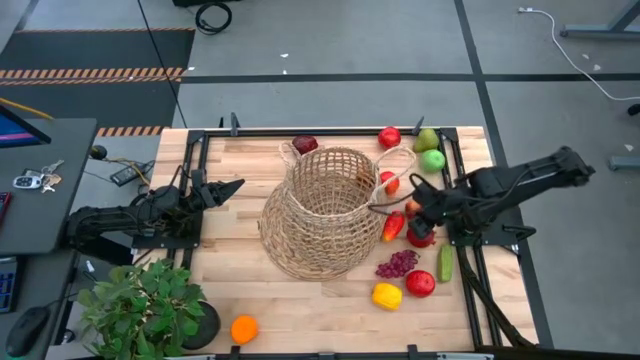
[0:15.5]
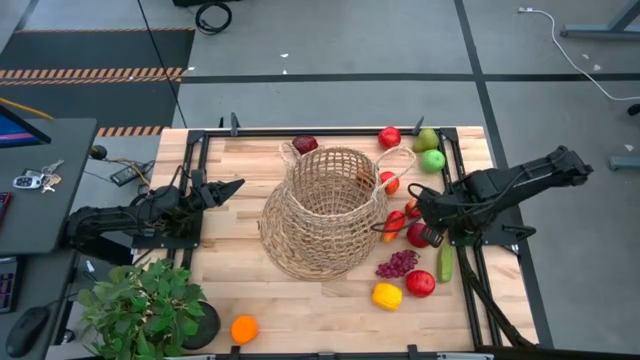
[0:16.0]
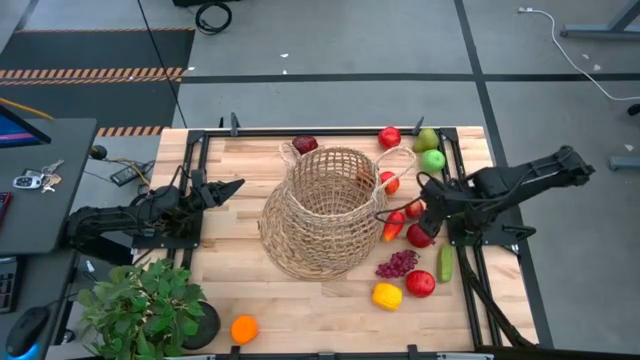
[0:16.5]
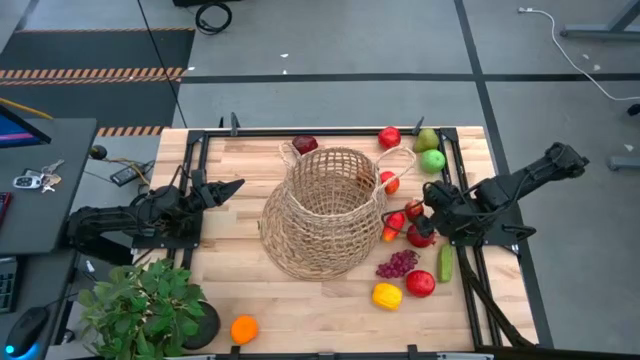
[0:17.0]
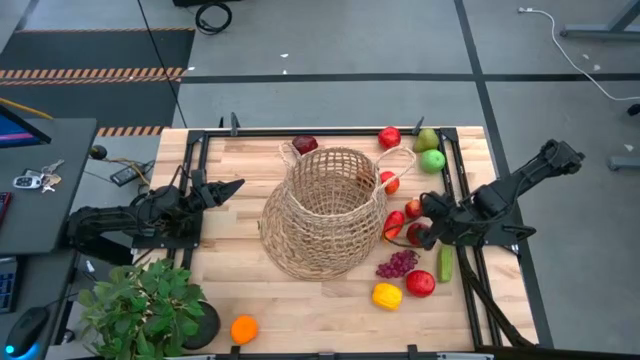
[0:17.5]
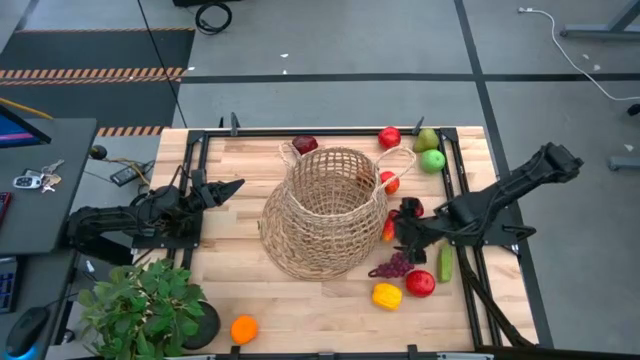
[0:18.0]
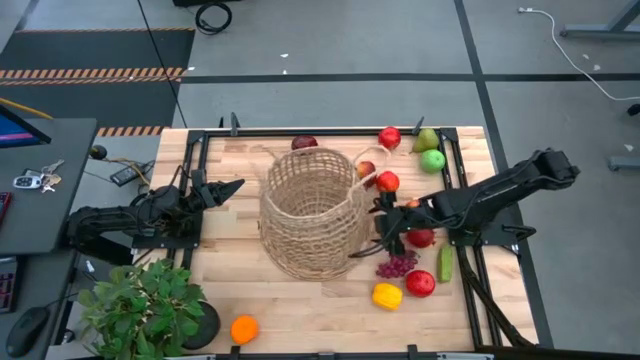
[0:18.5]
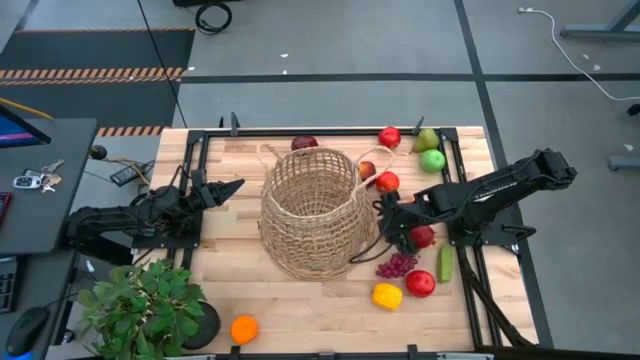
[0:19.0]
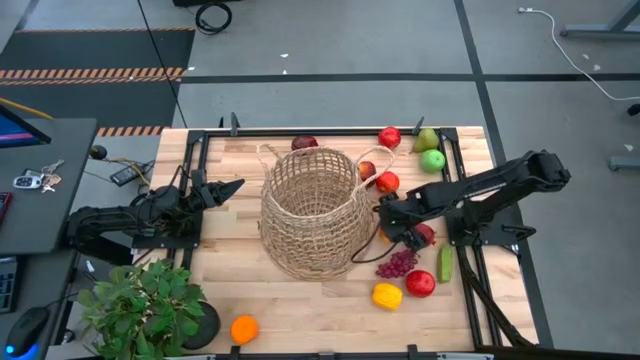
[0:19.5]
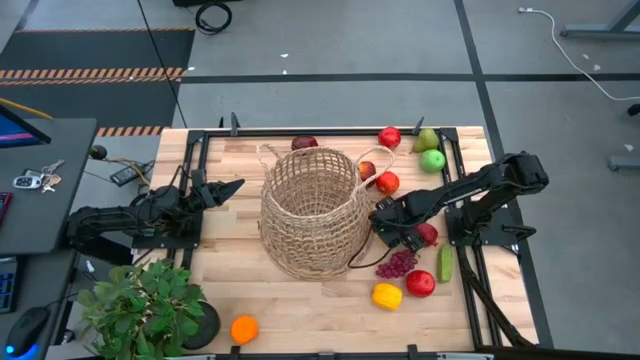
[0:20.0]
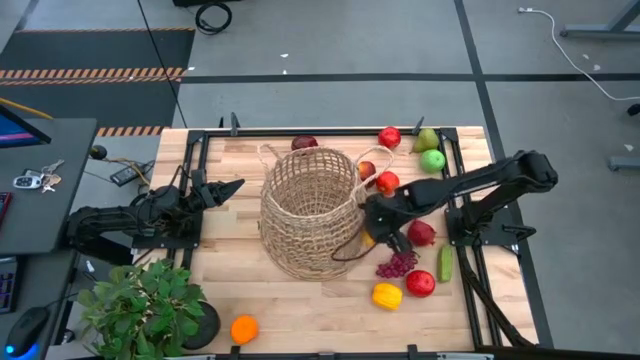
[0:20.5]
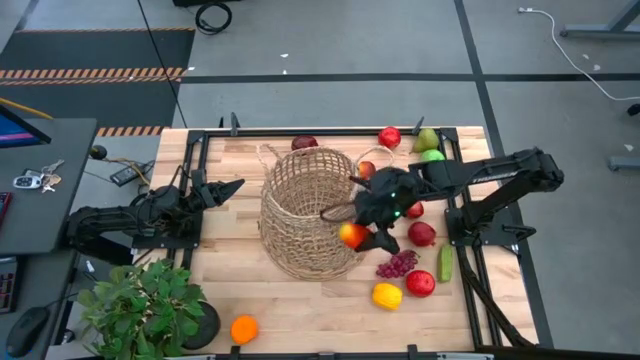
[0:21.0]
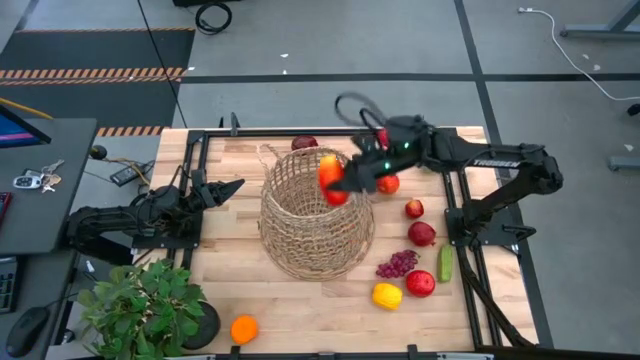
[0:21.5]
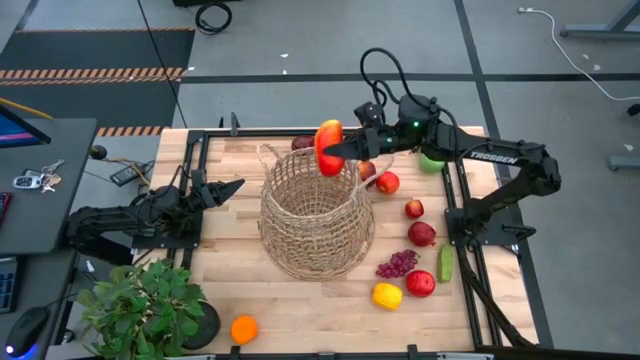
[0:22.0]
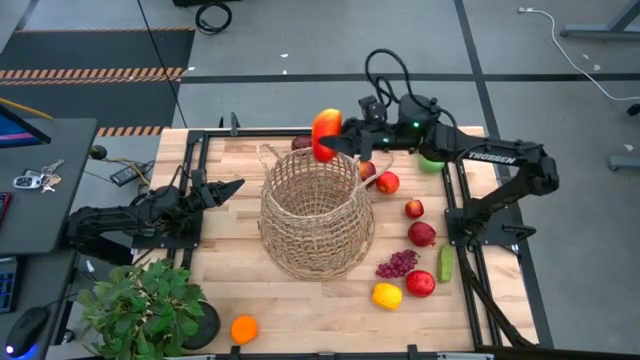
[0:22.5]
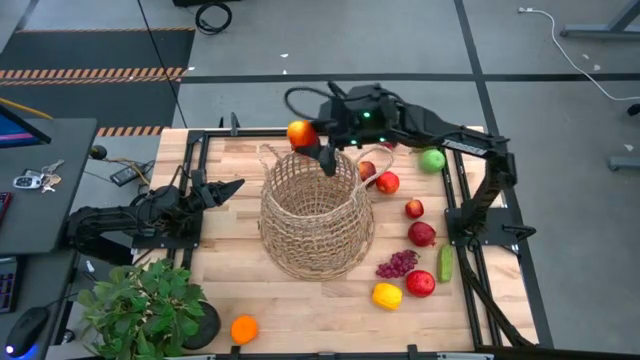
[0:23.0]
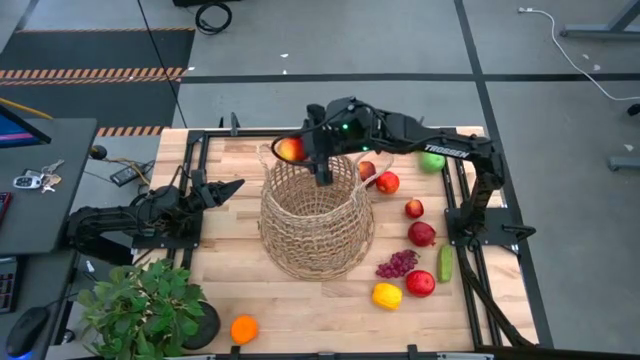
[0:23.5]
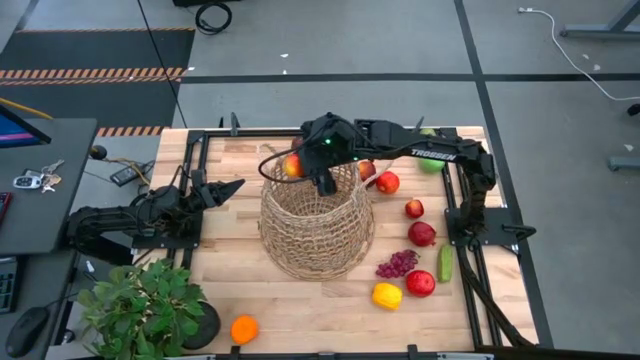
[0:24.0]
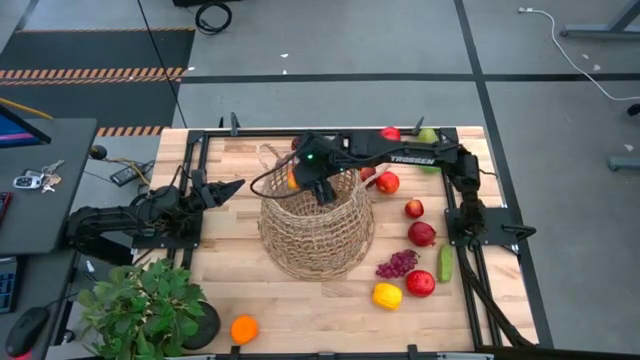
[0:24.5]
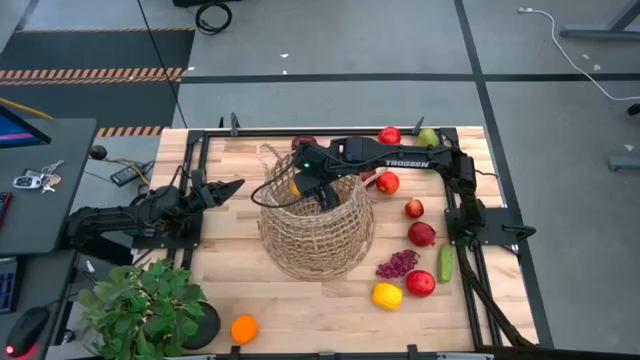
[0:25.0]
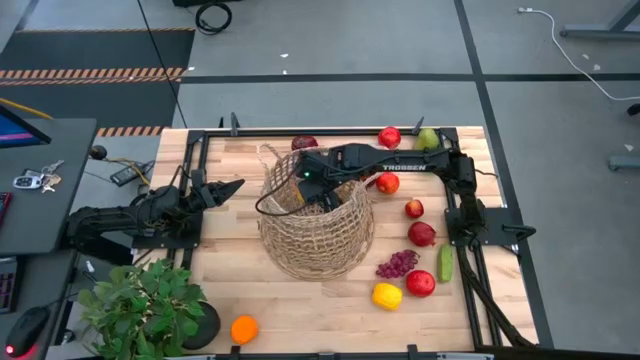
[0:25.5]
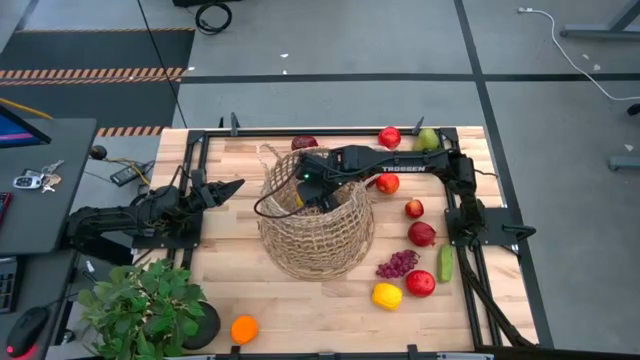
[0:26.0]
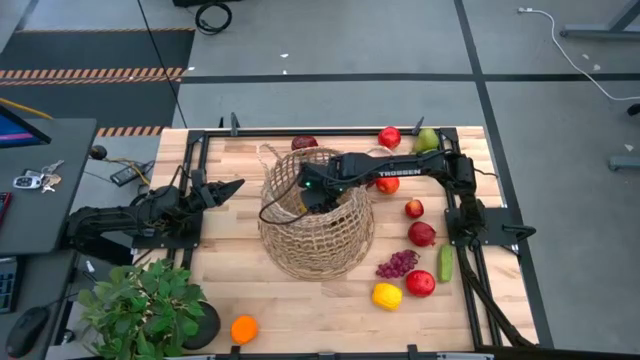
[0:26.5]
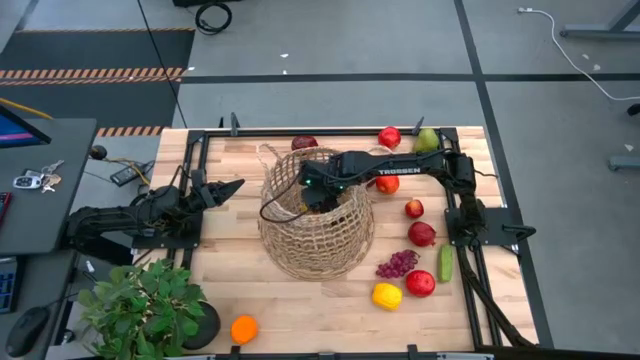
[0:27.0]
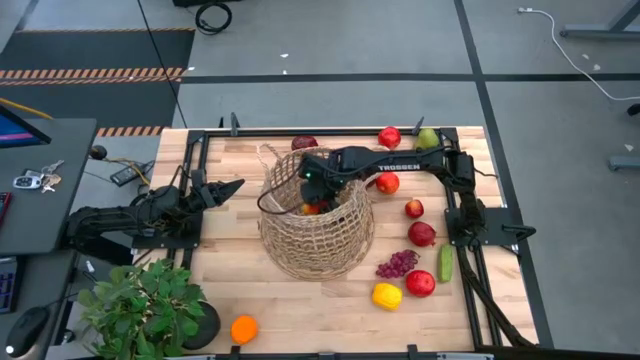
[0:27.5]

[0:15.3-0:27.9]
Task: Build produce basket
Put the mango into the basket

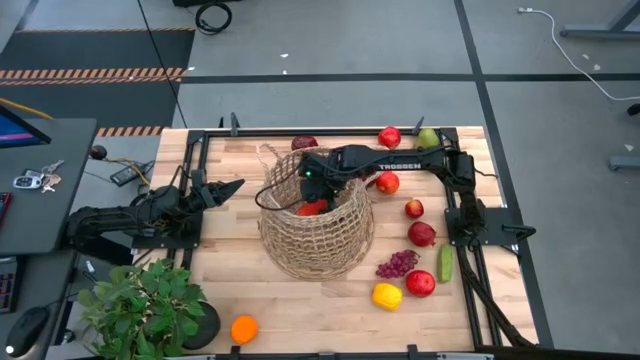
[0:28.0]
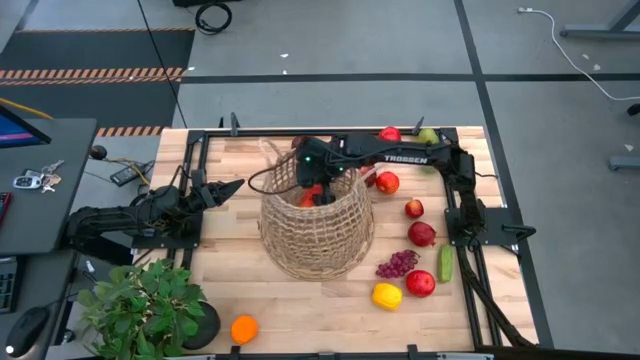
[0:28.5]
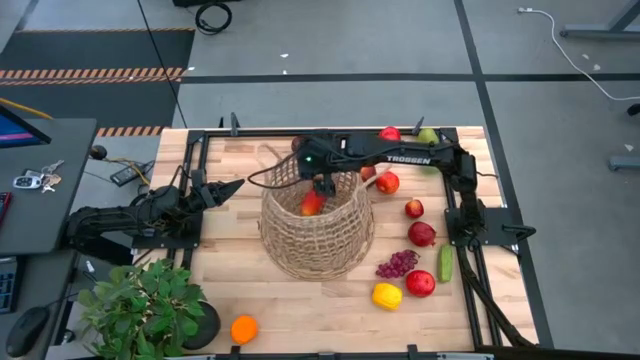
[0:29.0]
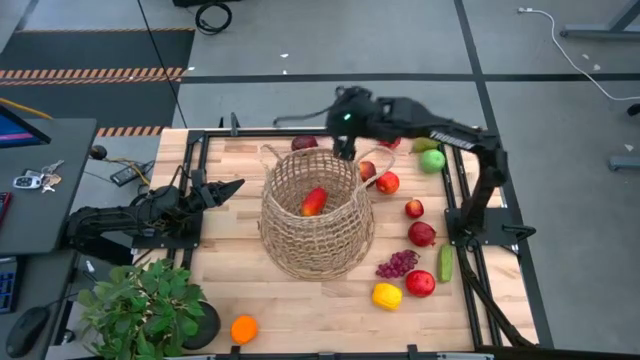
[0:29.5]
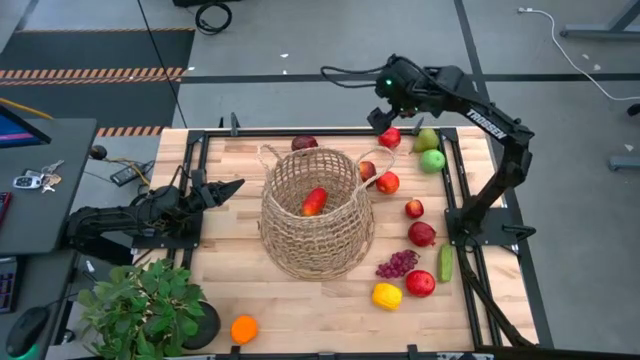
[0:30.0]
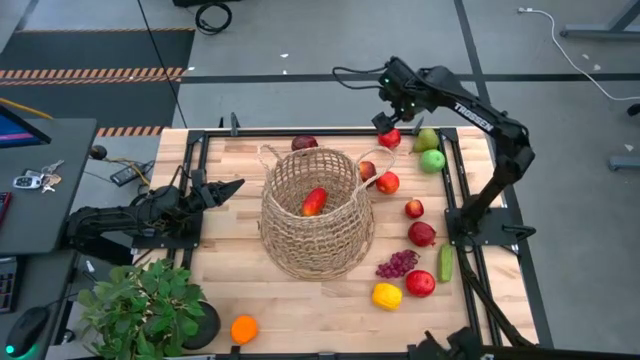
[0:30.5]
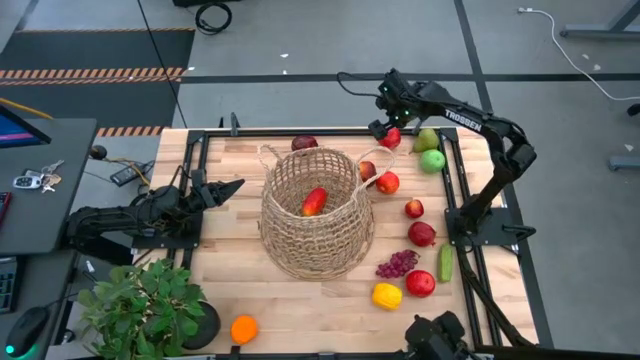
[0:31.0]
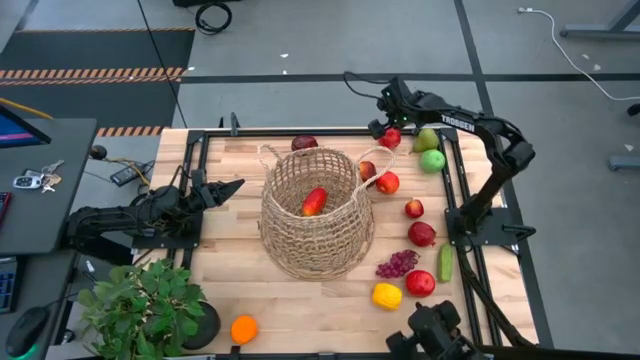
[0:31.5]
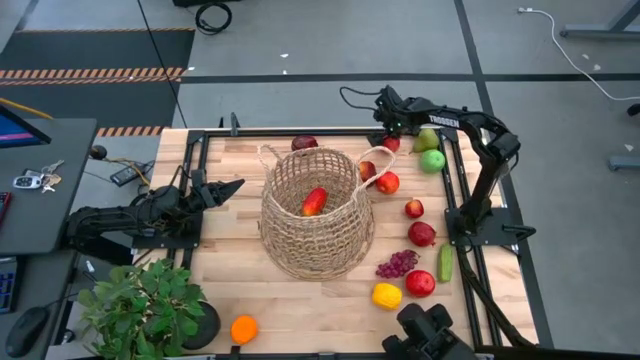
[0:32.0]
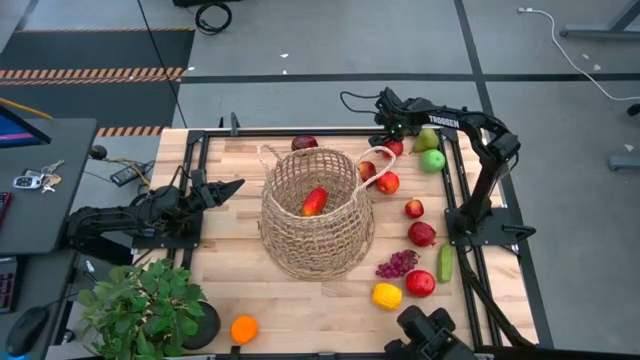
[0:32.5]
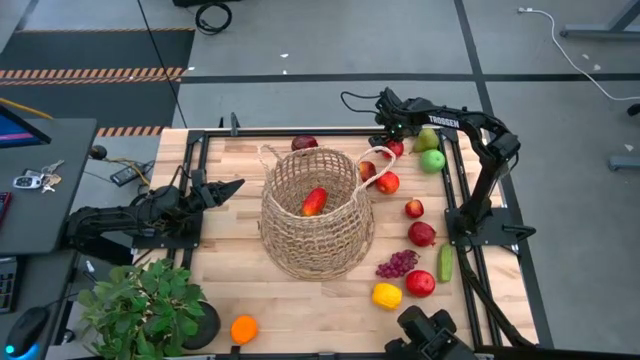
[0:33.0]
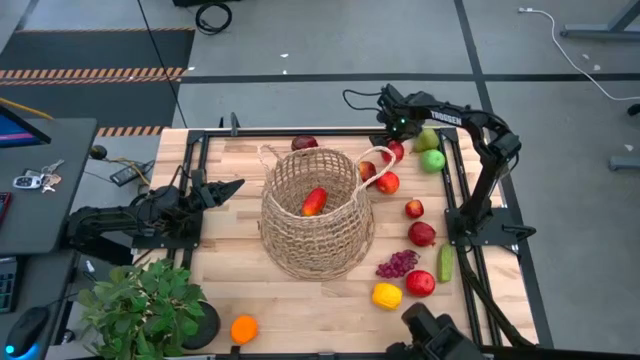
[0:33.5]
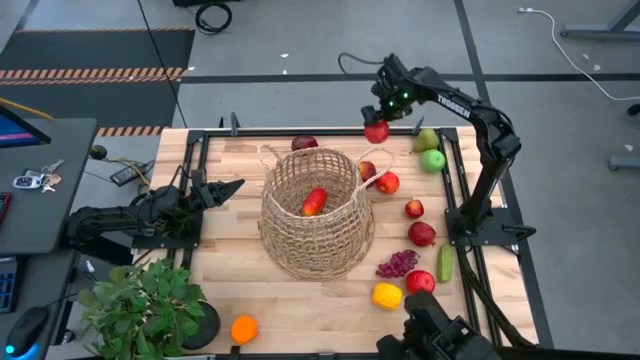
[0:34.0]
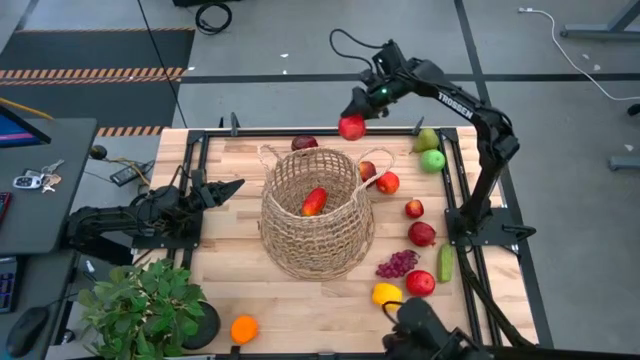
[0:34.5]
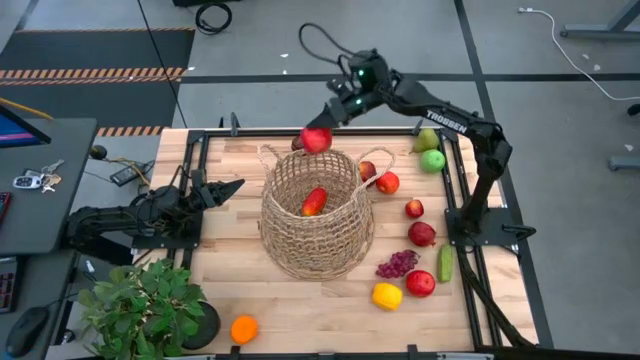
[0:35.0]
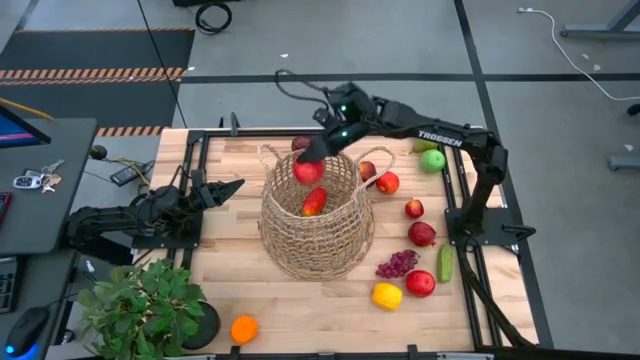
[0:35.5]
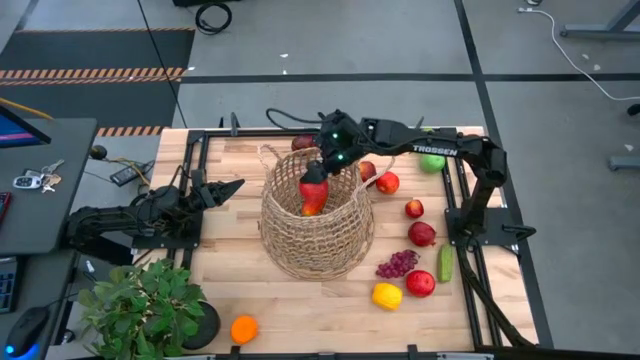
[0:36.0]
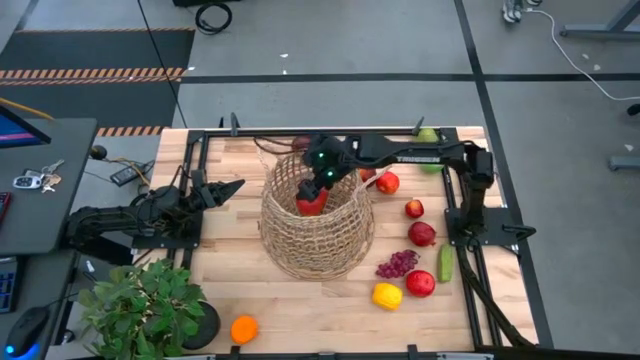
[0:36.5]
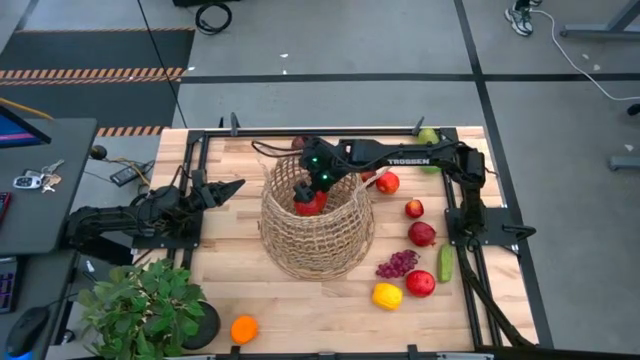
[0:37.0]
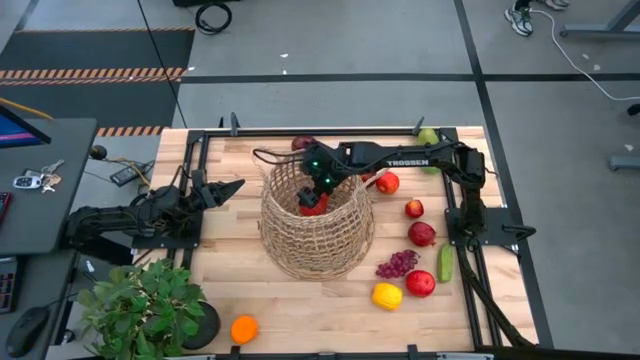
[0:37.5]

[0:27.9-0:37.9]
Put the red apple into the basket

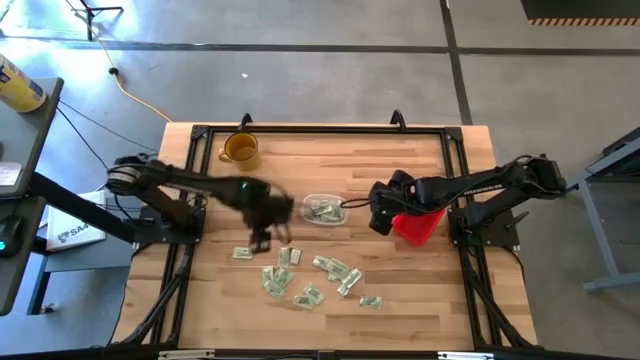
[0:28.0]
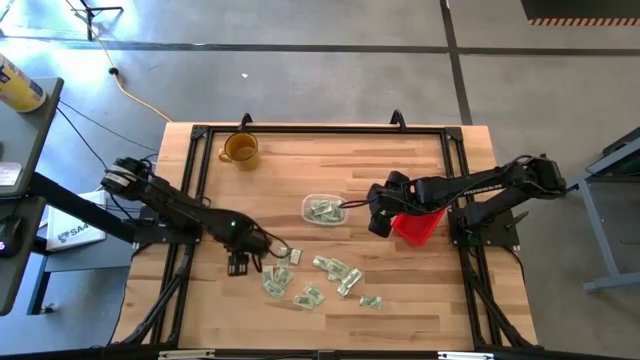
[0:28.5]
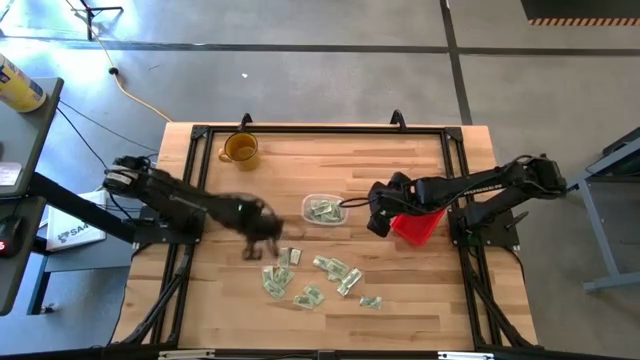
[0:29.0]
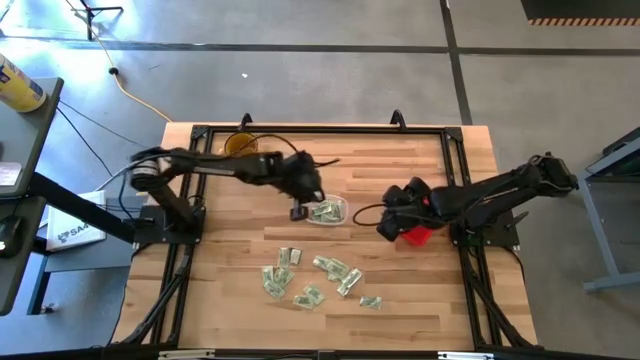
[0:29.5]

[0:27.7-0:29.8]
Task: Pick and place items into bin
Put the white stevia packet into the transparent bin
